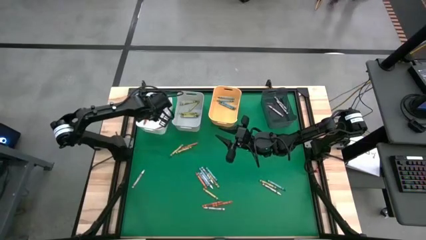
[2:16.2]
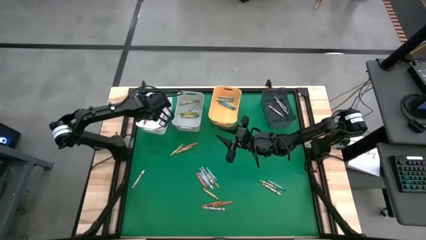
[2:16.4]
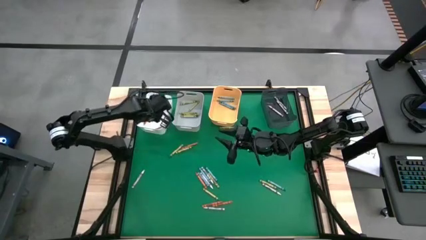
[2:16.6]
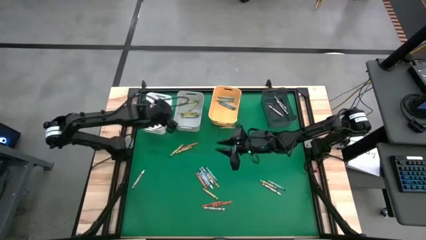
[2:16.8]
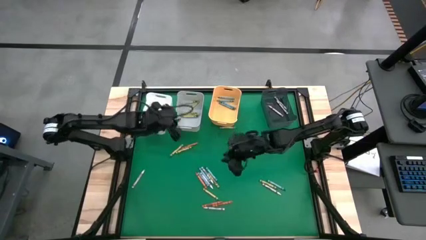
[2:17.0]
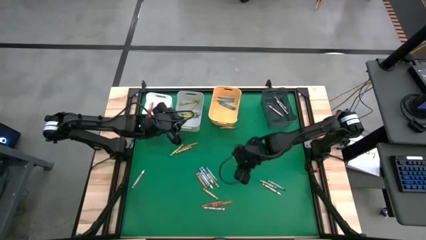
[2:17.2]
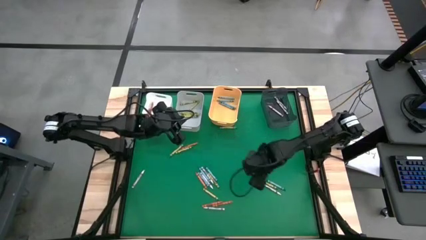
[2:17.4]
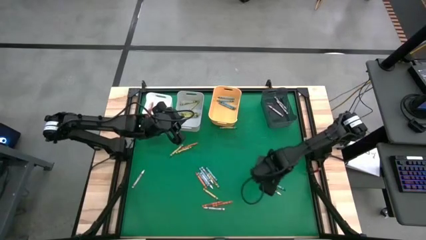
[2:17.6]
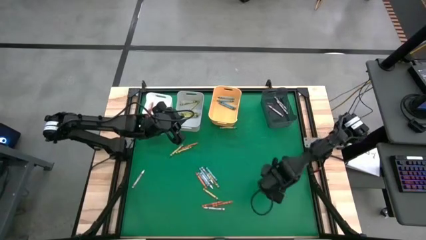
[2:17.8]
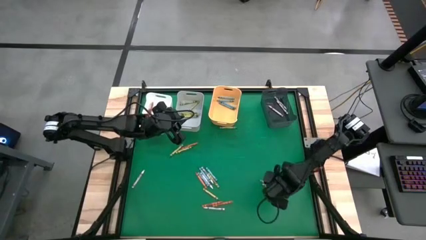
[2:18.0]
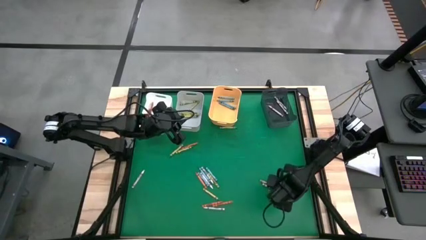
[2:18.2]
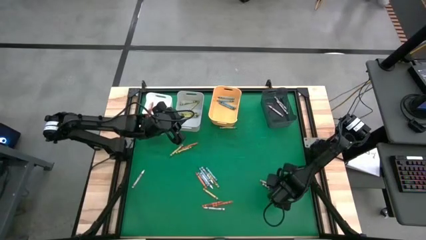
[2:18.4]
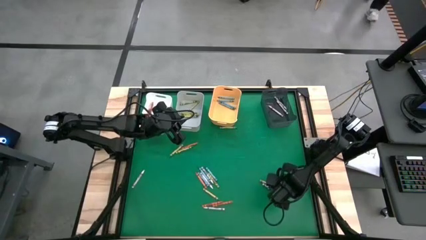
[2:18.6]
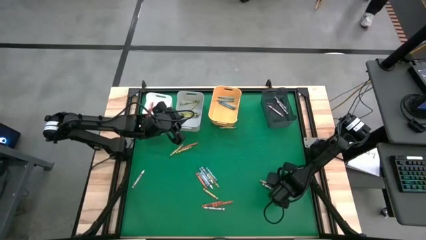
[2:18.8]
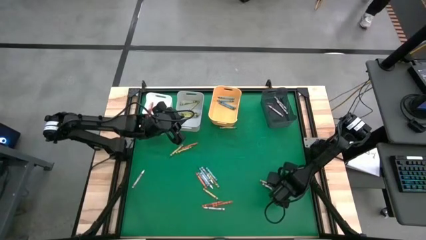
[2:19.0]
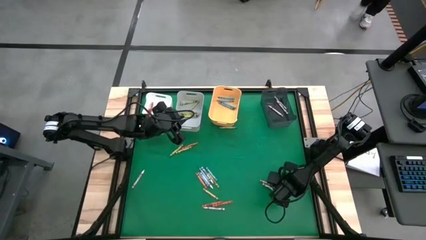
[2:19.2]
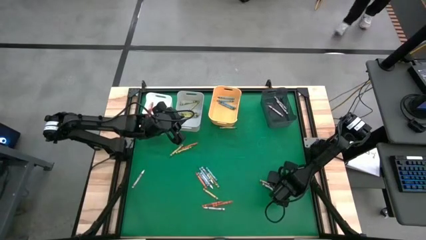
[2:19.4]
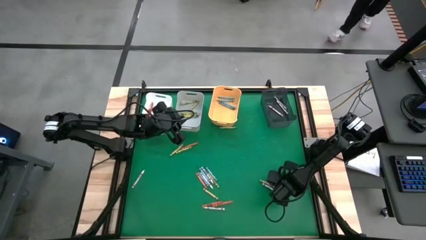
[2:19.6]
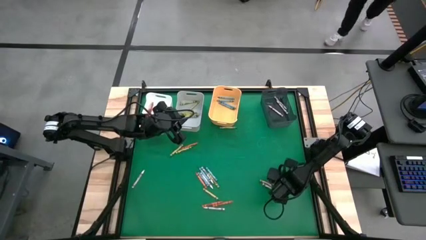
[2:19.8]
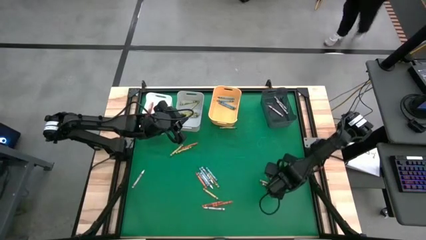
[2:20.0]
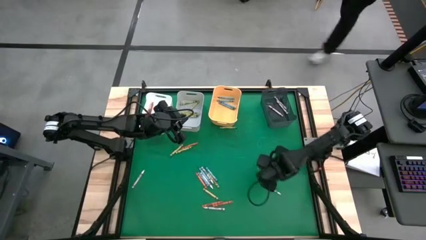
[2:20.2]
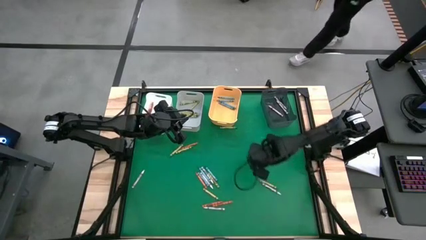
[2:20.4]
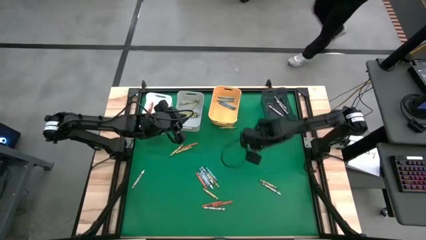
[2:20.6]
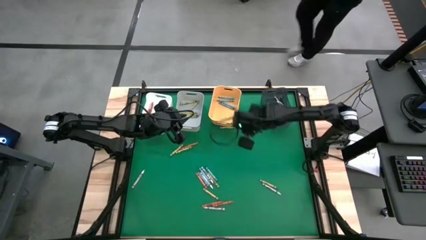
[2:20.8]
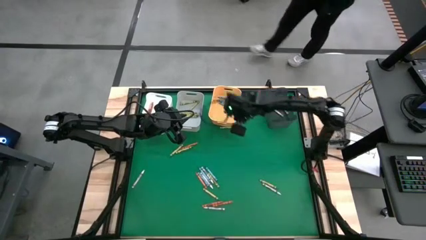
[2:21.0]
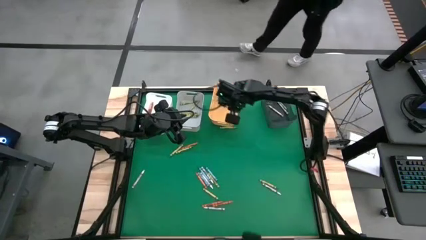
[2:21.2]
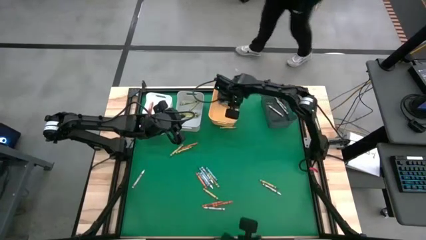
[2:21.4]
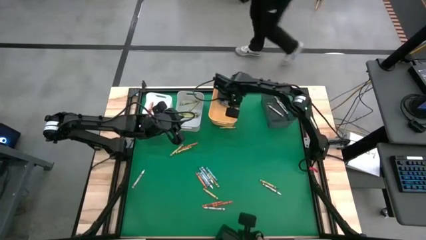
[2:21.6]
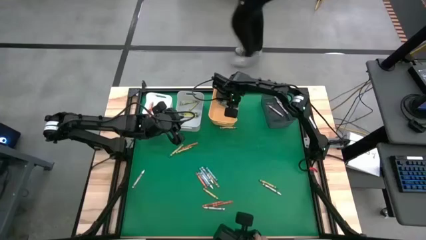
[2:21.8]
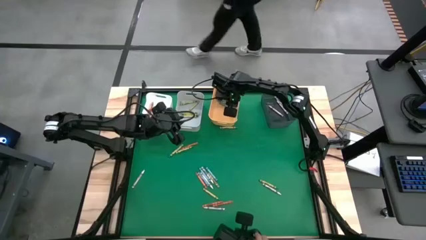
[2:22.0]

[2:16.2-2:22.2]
Task: Sort crayons
Put the blue crayon into the yellow bin

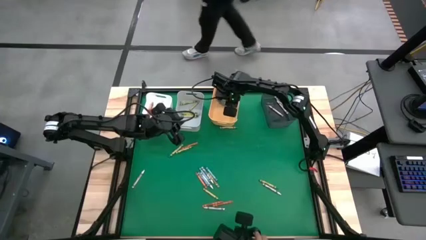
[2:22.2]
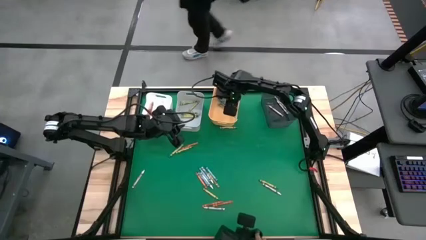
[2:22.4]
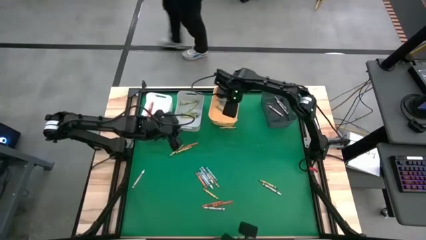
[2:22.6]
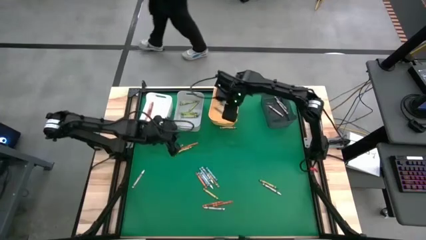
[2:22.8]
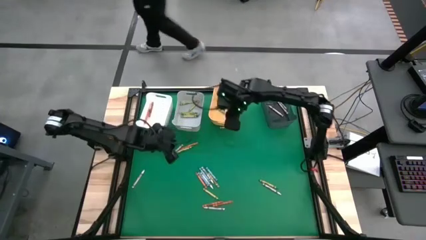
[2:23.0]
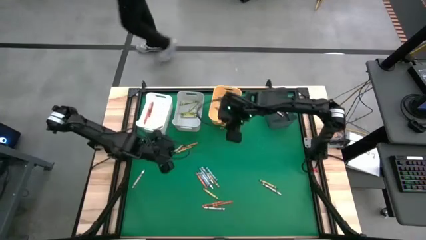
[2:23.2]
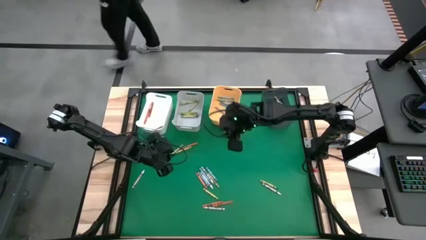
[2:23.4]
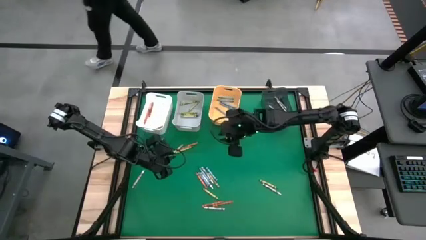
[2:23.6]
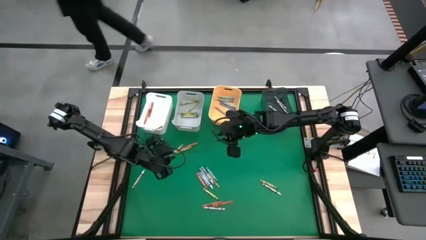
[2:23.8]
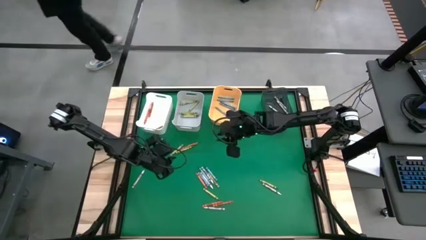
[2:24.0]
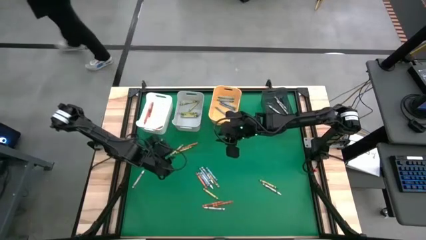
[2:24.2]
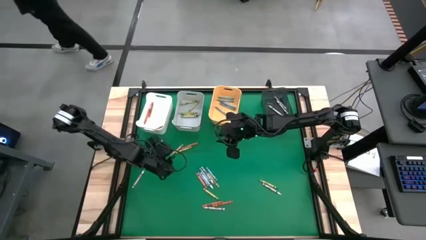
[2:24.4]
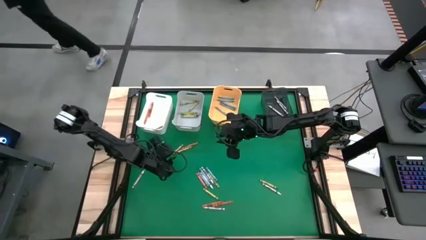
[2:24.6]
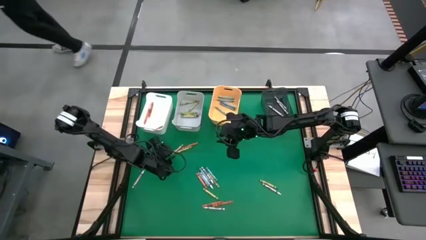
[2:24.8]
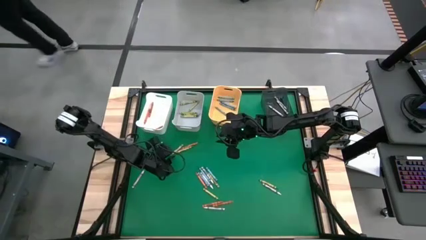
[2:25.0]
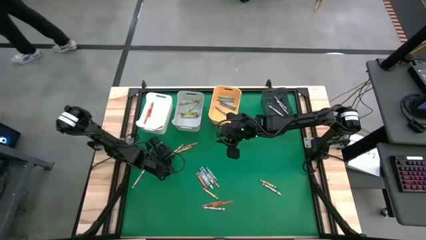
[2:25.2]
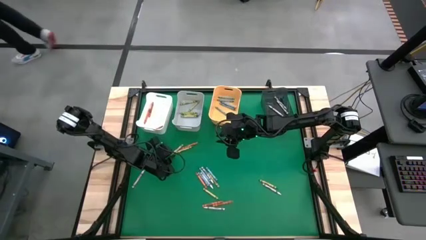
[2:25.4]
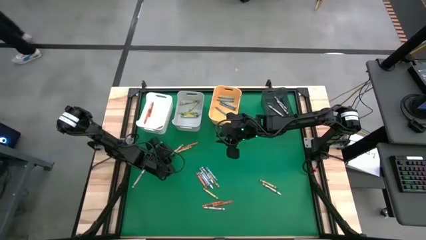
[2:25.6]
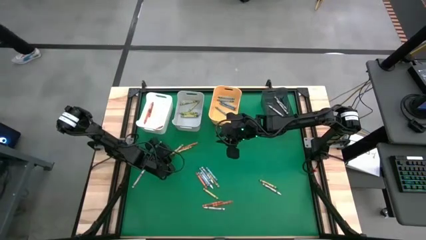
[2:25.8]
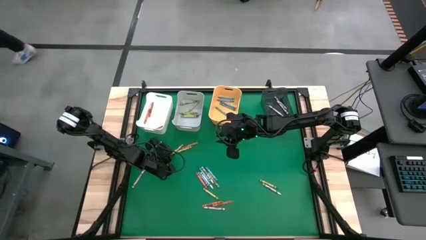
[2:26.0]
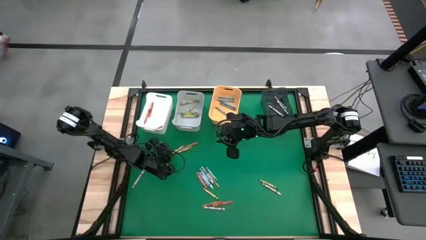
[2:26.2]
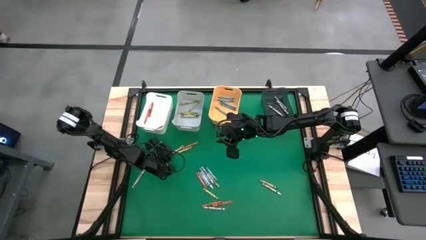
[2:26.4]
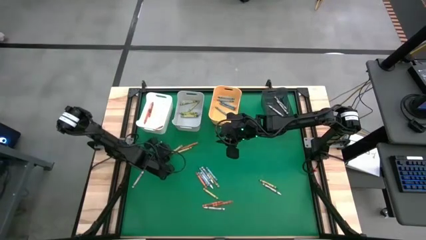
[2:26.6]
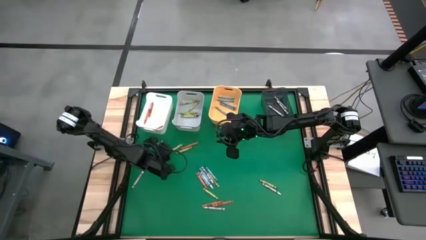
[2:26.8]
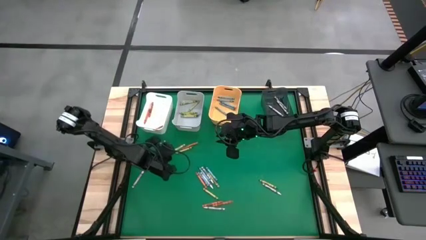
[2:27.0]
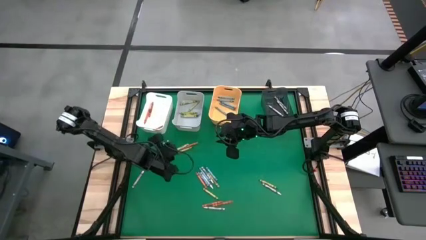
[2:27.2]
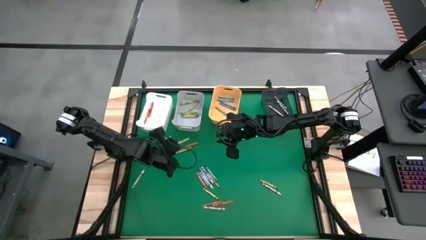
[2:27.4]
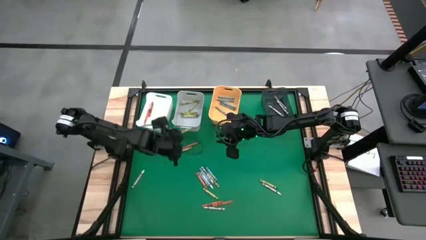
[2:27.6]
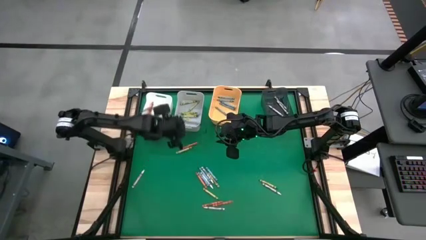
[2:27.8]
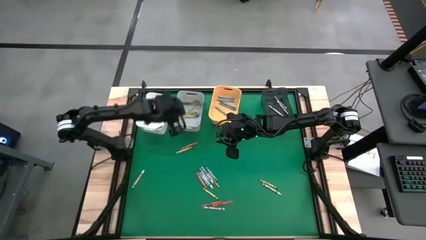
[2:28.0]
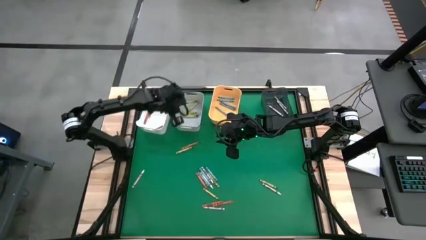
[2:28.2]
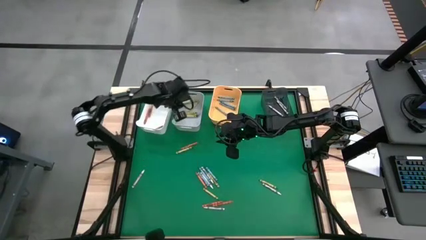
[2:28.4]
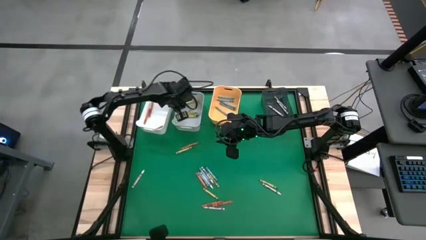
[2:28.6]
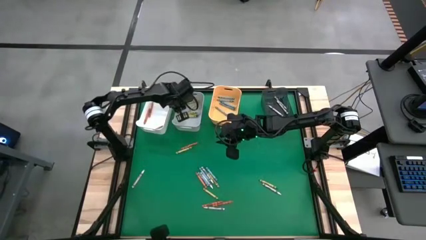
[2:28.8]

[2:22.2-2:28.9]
Put the green crayon into the gray bin

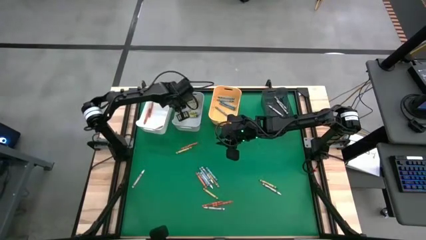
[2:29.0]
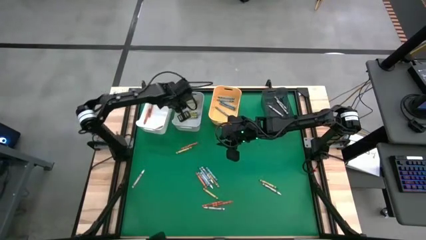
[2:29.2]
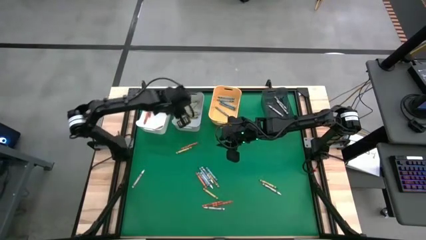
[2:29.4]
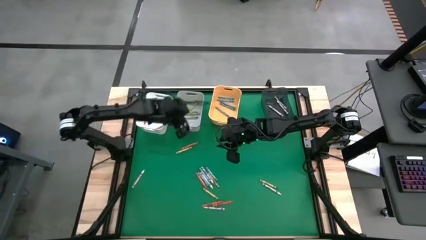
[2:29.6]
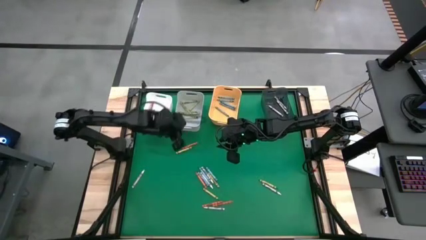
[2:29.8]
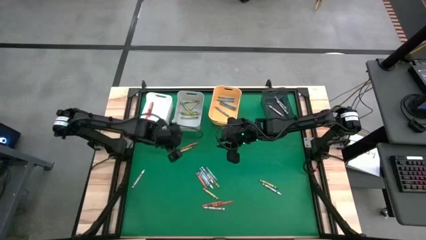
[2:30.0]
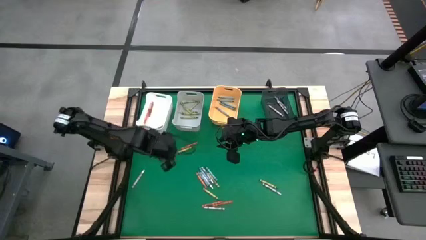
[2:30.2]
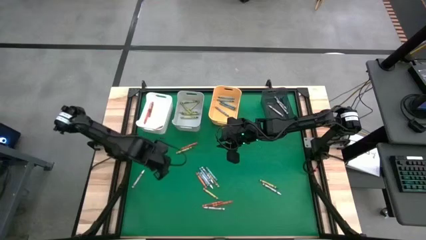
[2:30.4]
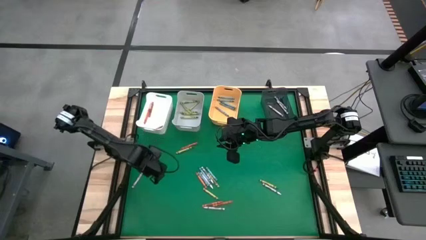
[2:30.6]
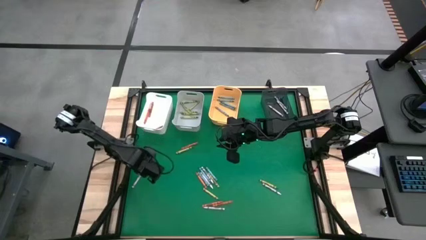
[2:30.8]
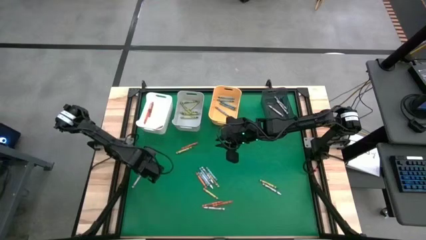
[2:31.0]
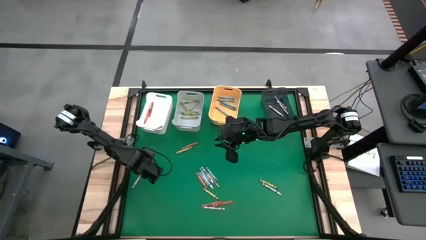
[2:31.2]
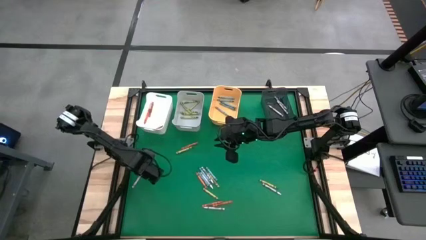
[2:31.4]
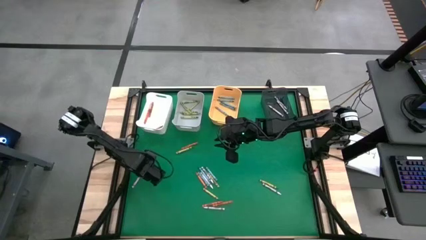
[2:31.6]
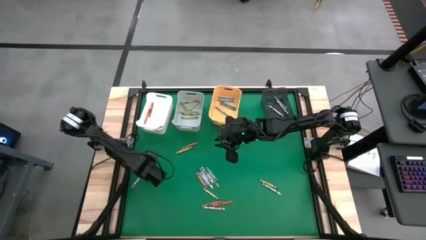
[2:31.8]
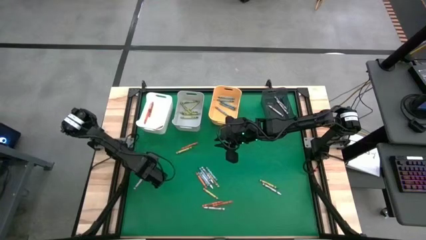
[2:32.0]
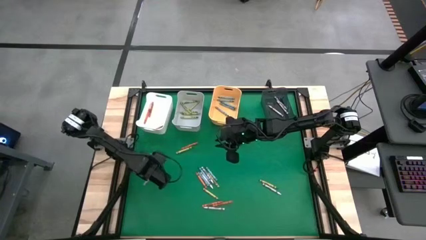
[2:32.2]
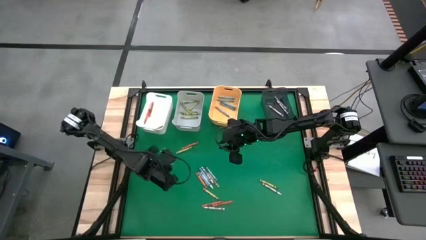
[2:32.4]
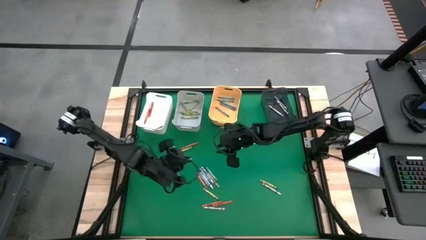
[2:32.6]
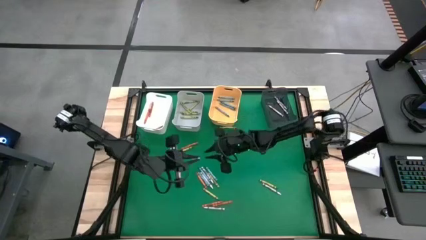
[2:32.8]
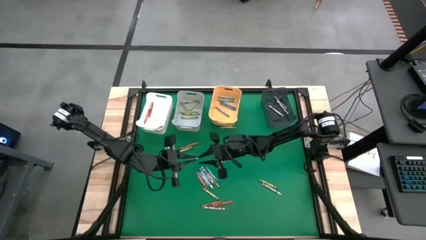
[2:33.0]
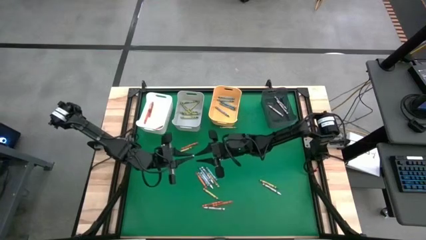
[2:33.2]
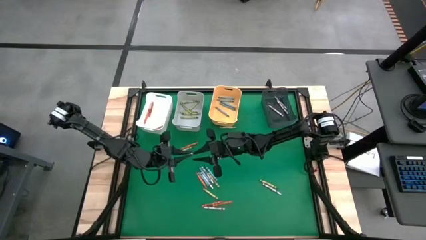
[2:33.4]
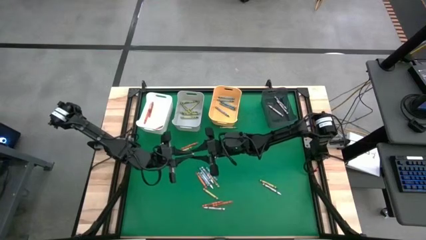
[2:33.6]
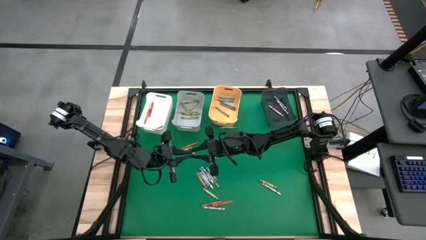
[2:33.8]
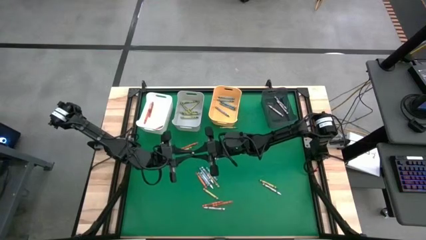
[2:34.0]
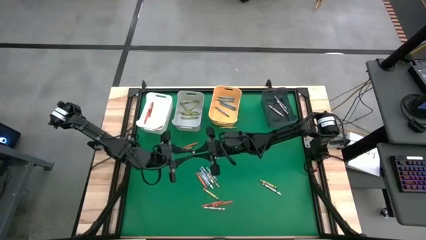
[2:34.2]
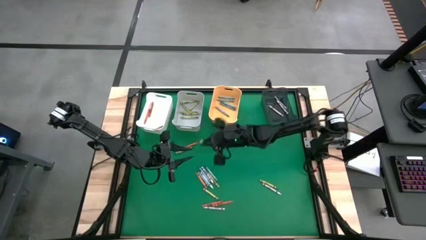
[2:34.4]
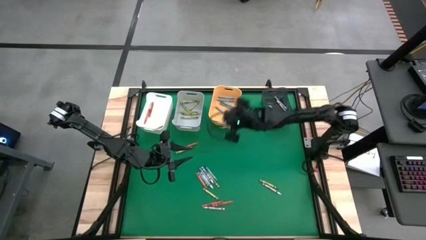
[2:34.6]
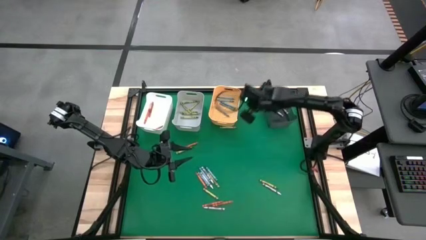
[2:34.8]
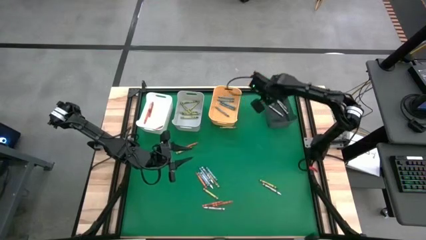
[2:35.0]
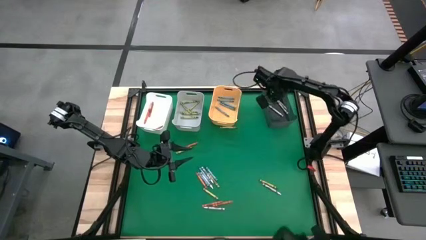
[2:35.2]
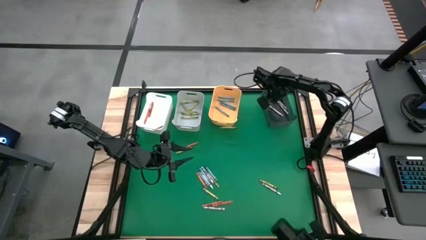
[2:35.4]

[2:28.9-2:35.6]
Put the white crayon into the black bin
